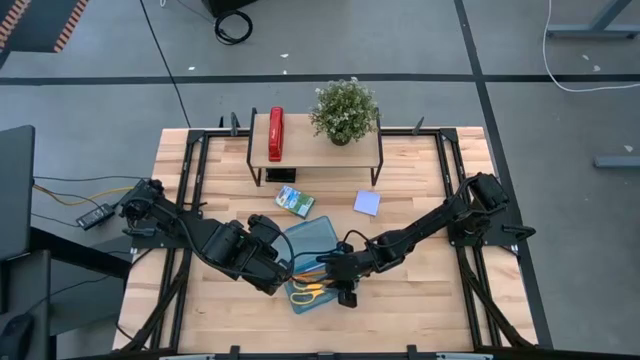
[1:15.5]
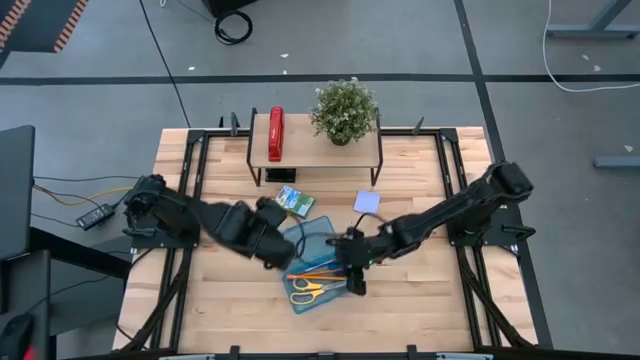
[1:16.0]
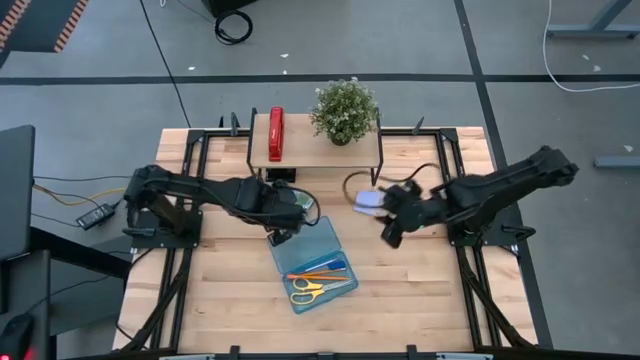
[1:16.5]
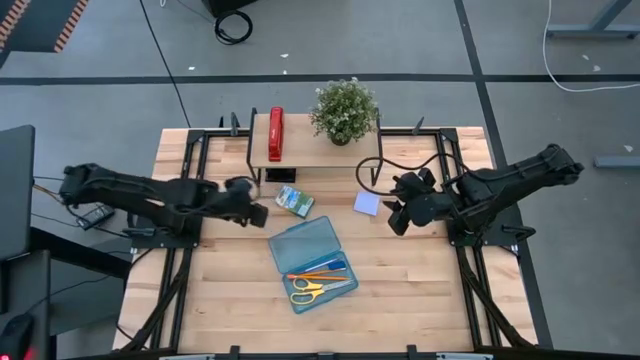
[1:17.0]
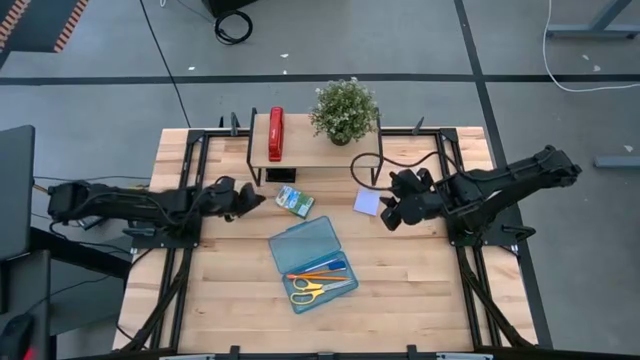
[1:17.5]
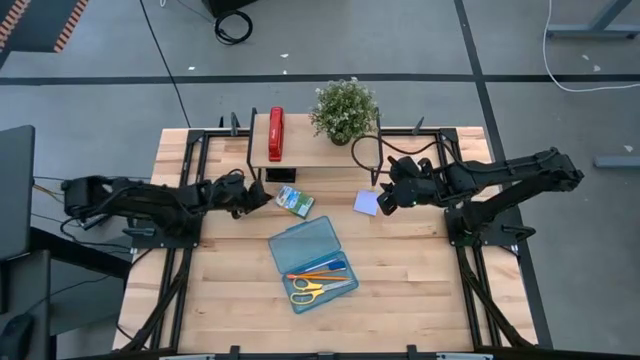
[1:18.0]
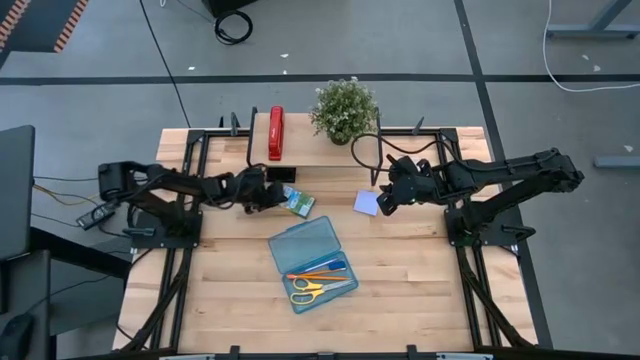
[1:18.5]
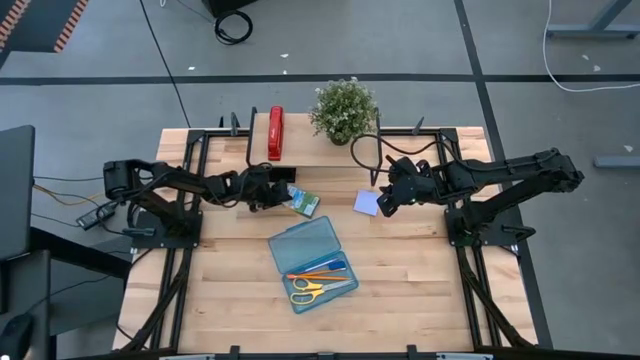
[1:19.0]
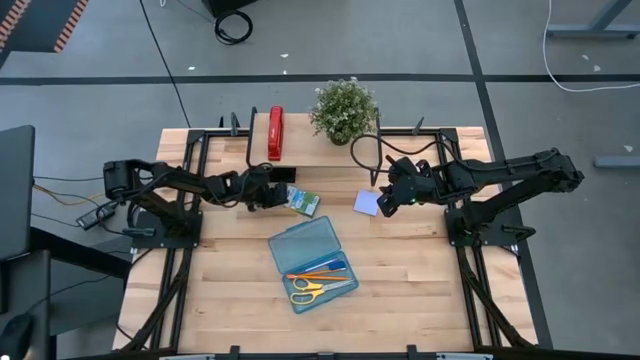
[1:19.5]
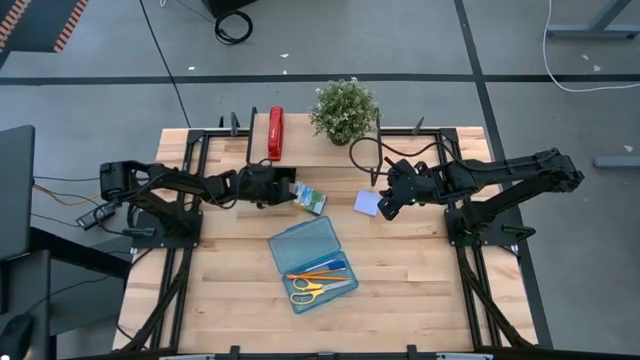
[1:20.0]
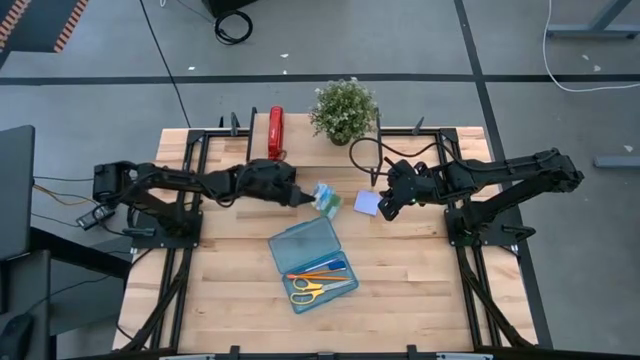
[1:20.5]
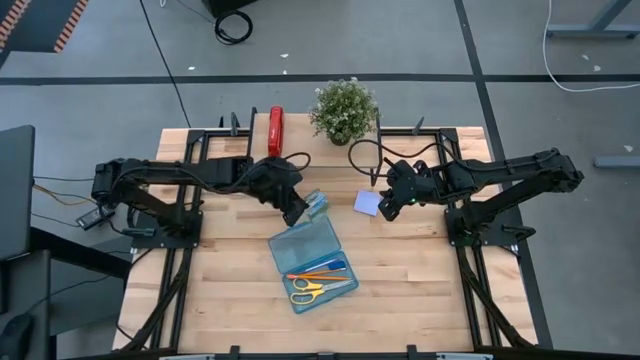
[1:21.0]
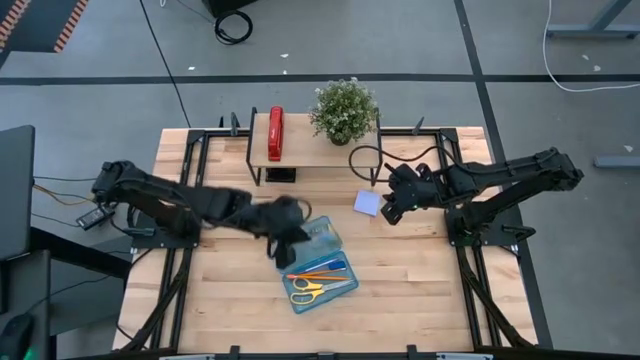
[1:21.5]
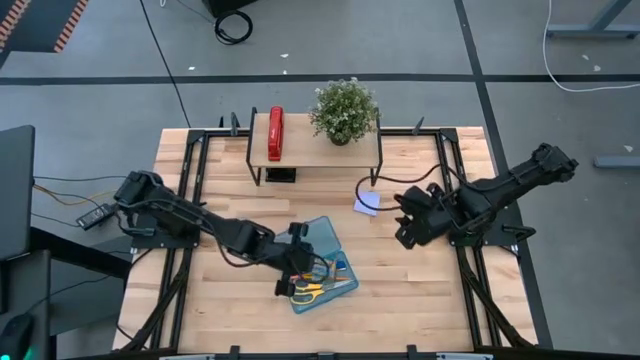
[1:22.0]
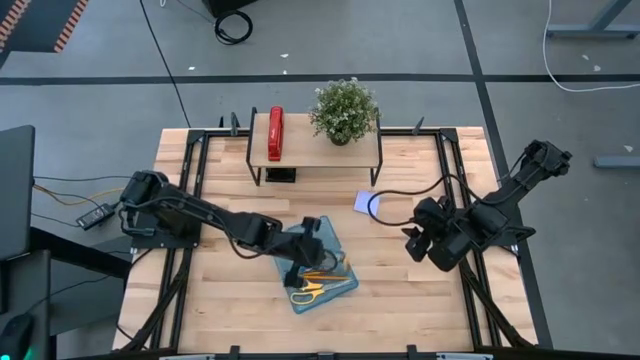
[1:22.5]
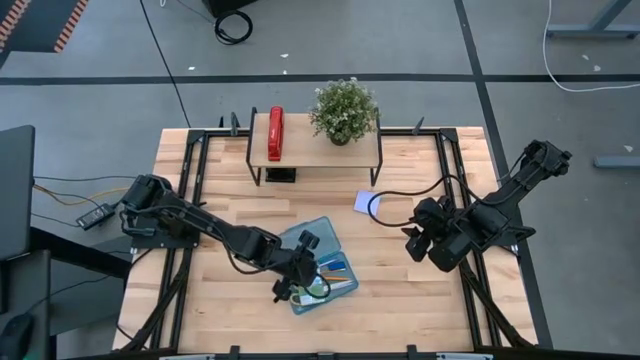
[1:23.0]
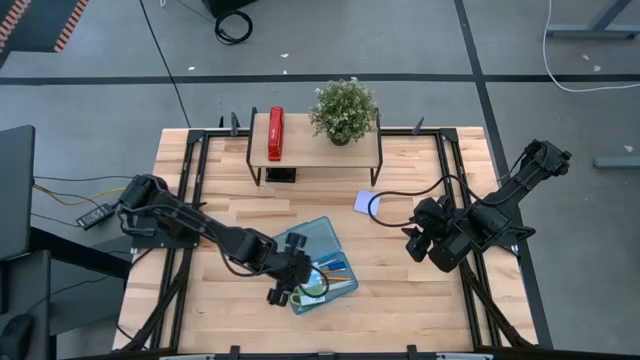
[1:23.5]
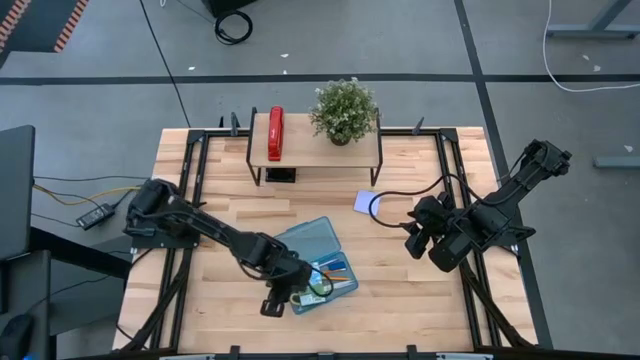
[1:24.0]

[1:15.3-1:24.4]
Task: Pack school essentials
Put the yellow crayon box into the blue supply box

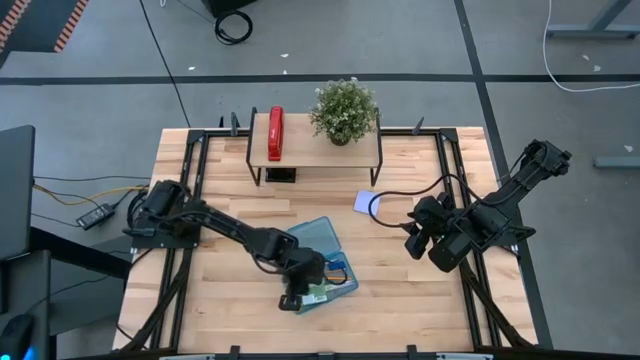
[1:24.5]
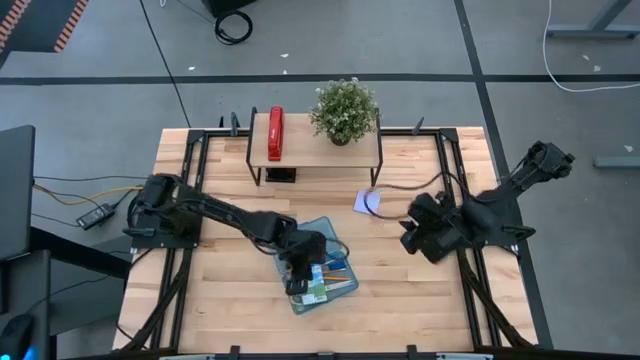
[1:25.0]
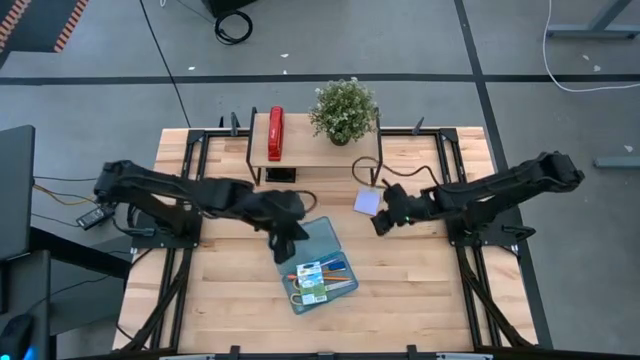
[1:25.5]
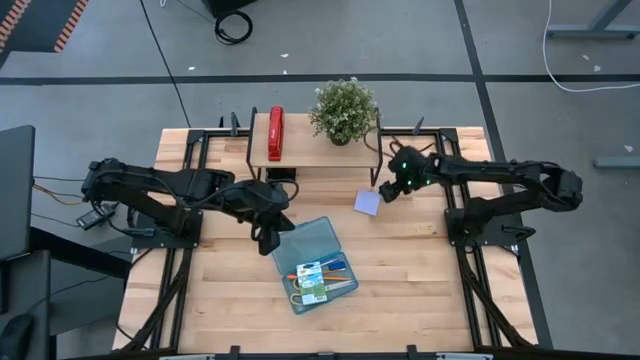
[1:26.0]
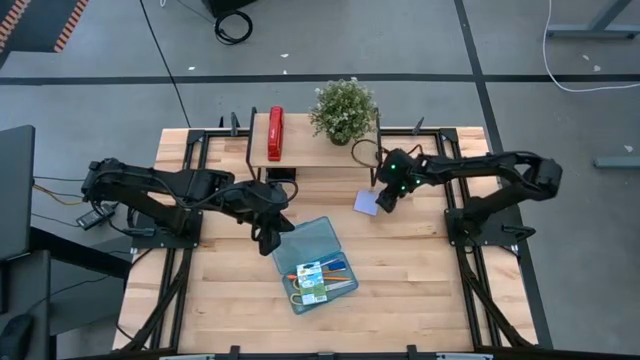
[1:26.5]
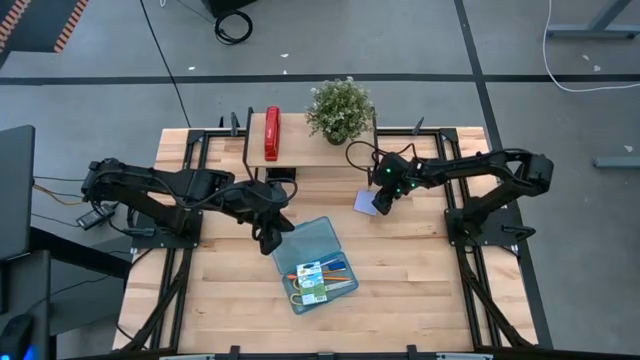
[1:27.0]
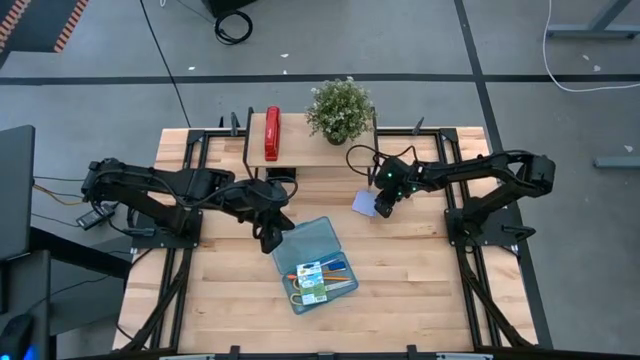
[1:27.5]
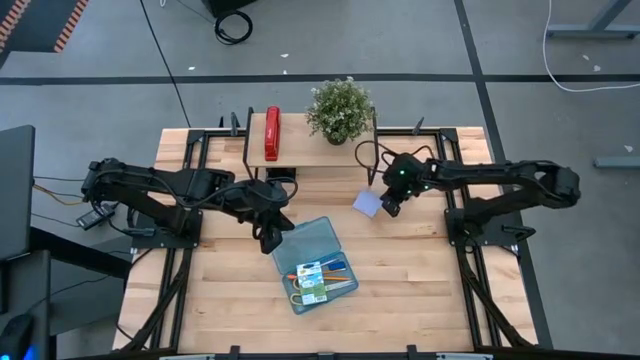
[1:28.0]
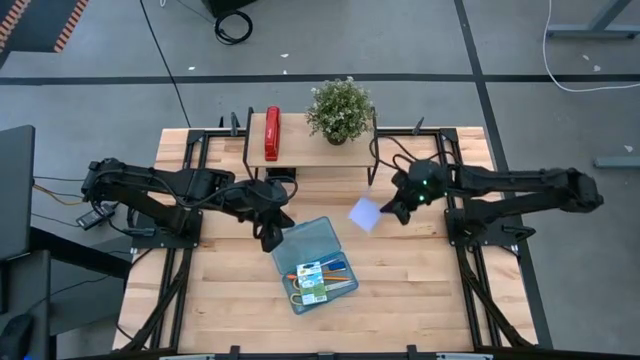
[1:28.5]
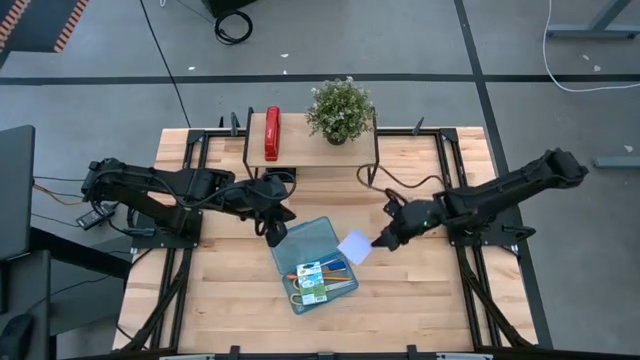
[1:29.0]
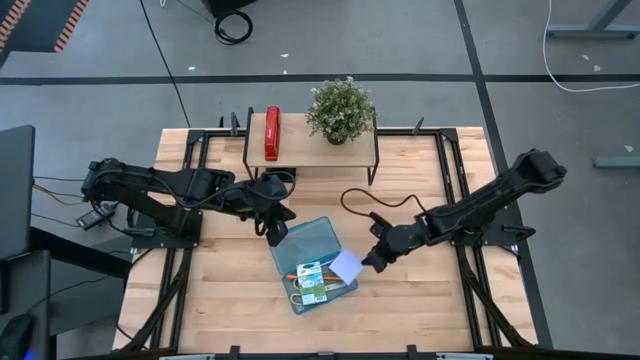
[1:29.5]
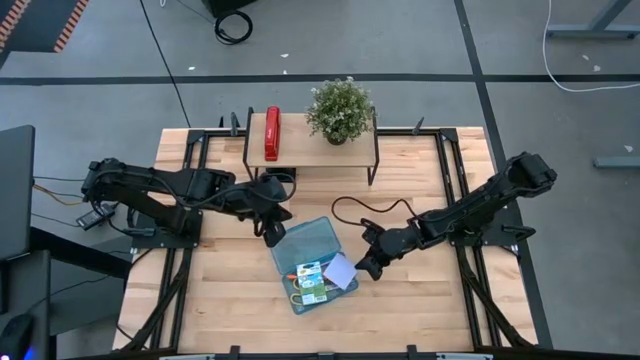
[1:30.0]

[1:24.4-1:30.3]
Put the violet sticky notes into the blue supply box

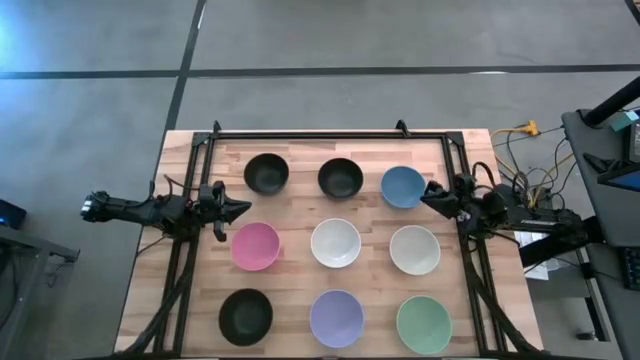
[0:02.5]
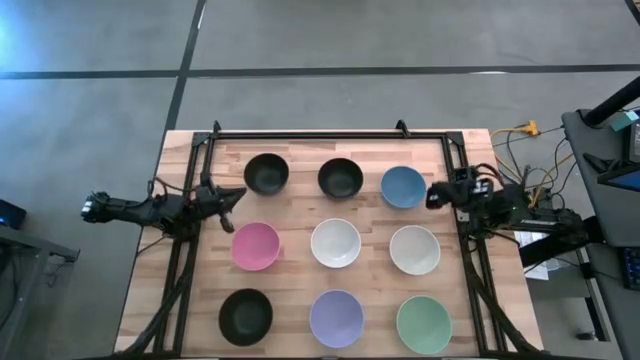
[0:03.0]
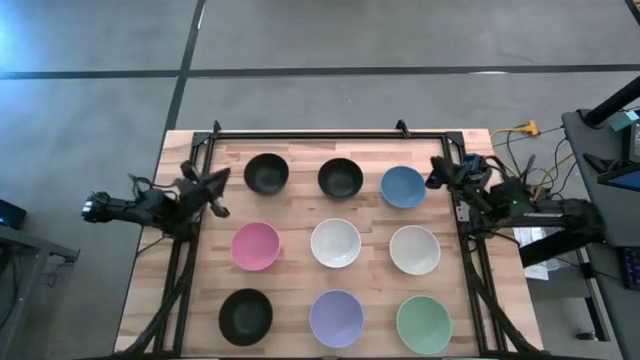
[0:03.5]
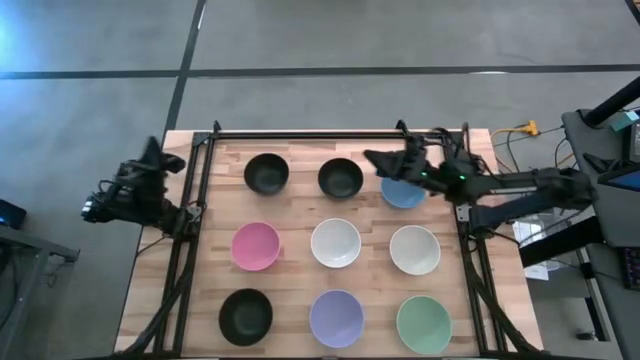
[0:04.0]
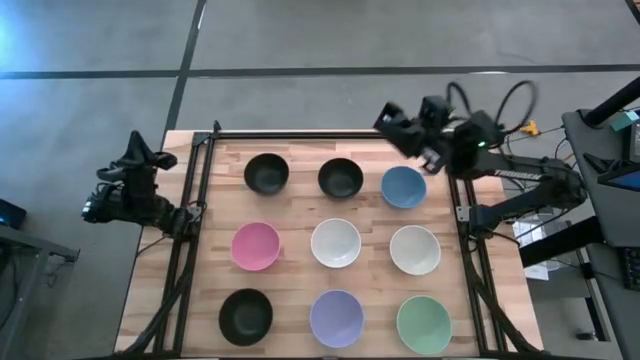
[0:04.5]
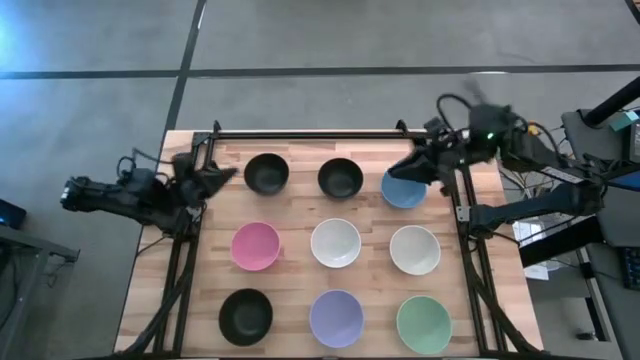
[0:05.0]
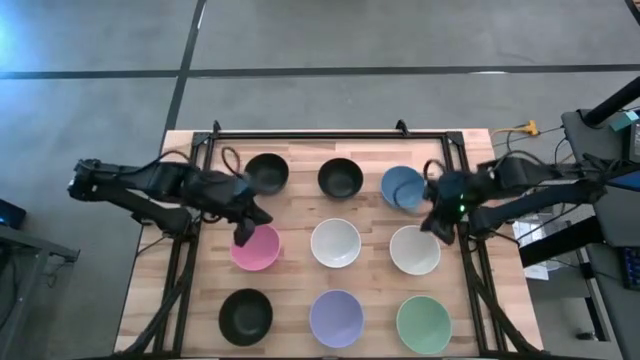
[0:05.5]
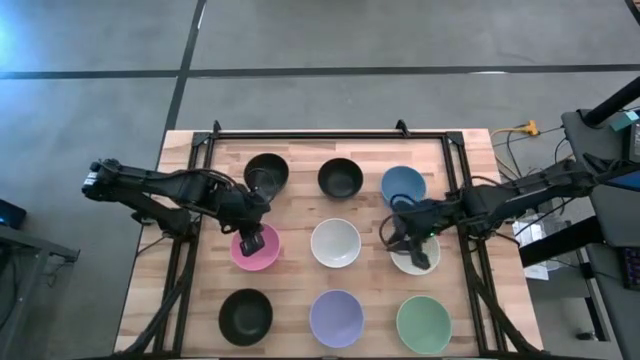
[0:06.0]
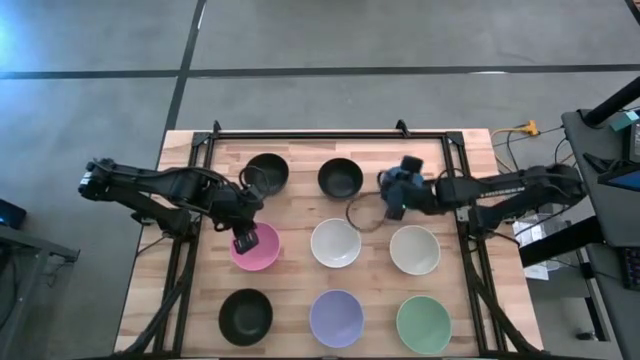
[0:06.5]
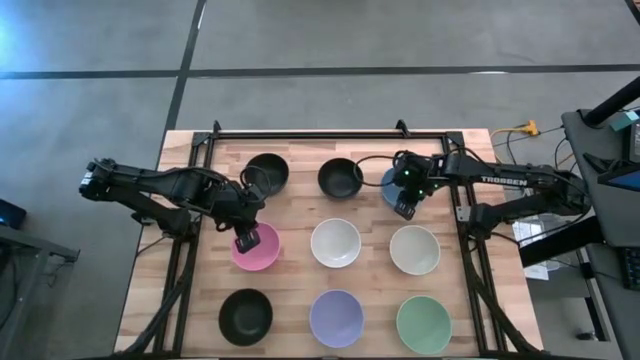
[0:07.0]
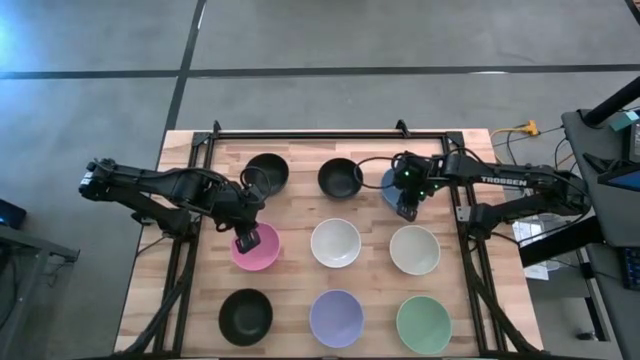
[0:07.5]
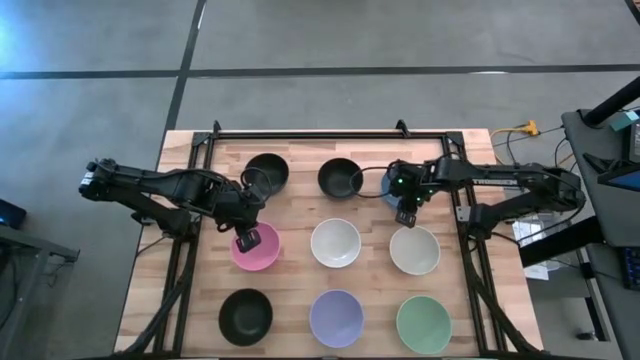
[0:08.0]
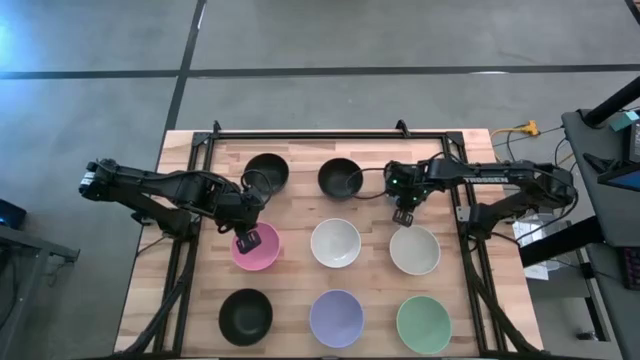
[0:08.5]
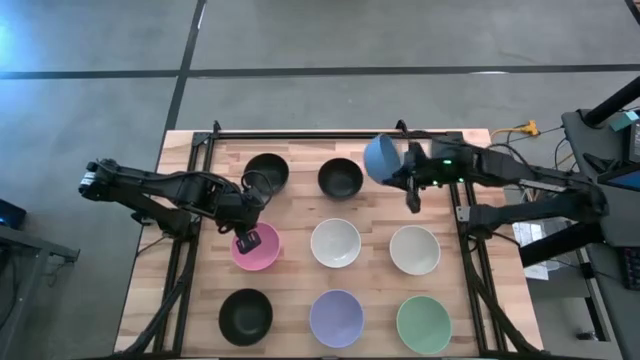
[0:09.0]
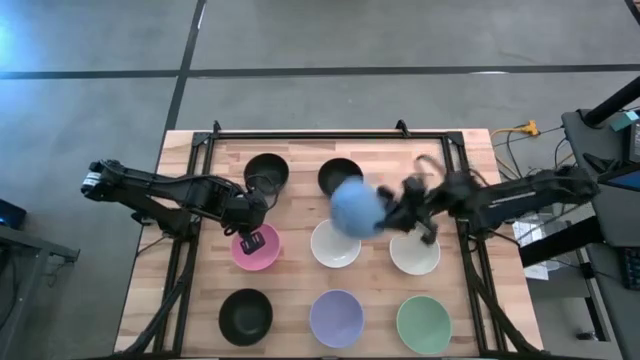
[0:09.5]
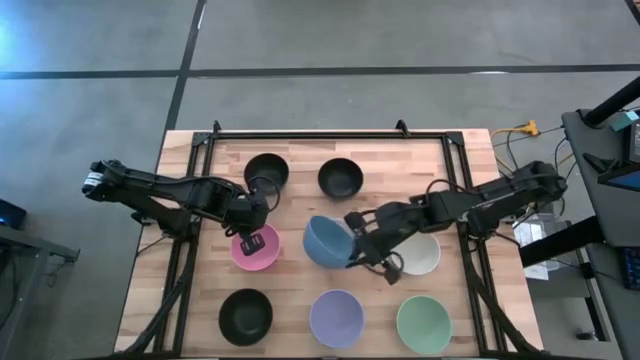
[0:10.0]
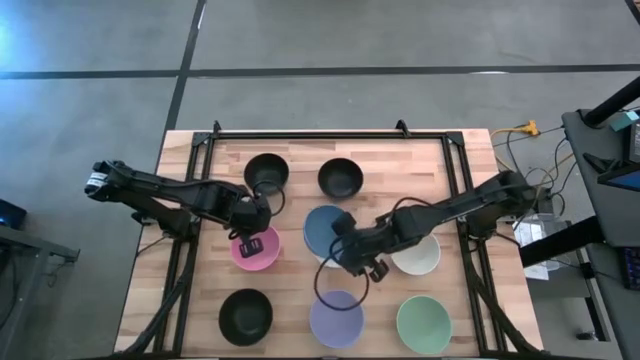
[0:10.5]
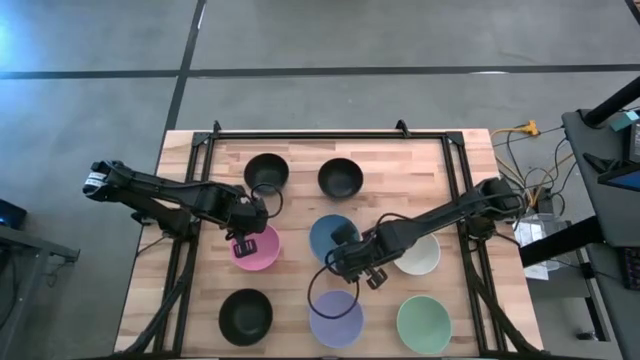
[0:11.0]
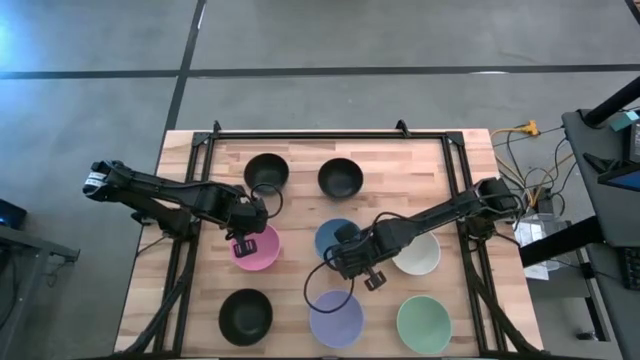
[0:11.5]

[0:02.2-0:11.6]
Task: Nest bowls inside each other
Stack the blue bowl on top of the left white bowl
